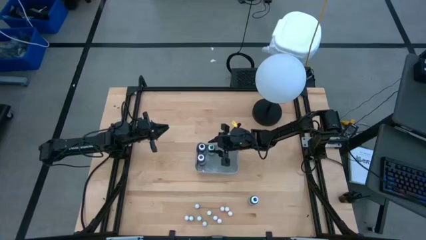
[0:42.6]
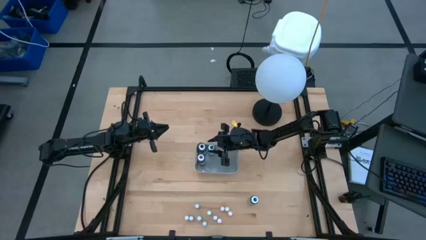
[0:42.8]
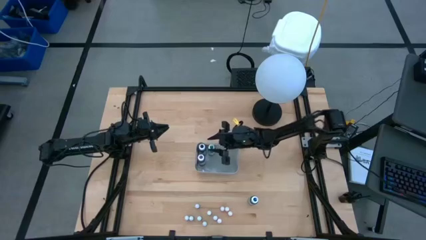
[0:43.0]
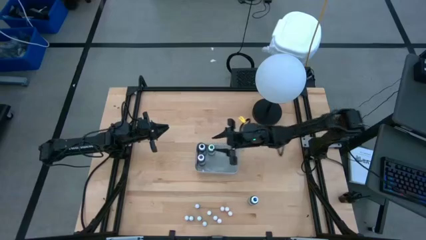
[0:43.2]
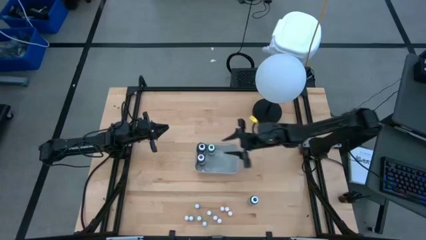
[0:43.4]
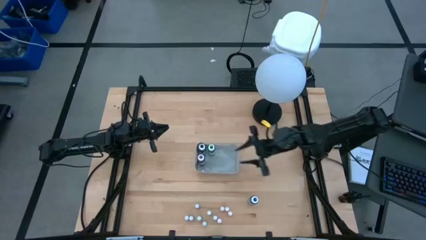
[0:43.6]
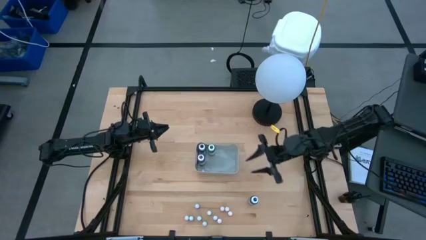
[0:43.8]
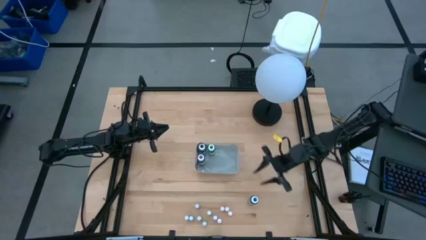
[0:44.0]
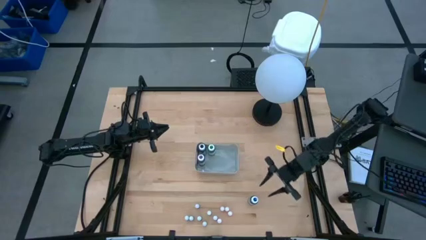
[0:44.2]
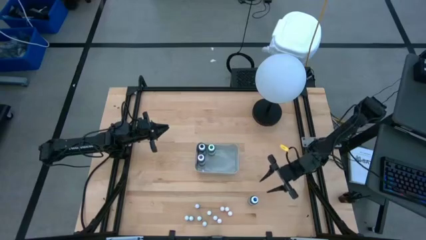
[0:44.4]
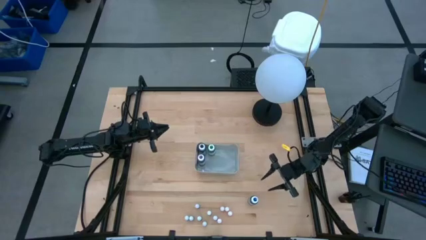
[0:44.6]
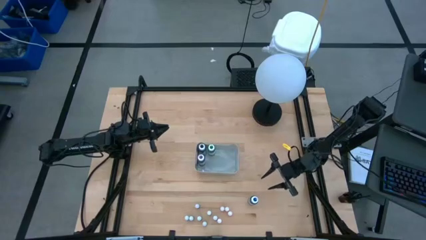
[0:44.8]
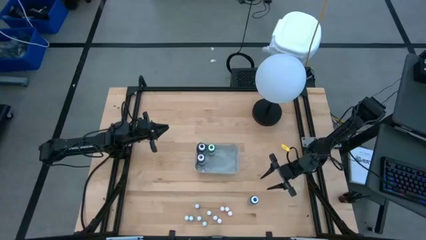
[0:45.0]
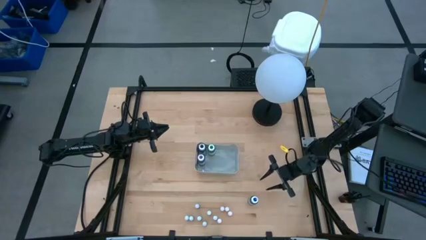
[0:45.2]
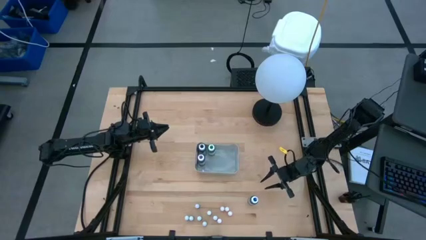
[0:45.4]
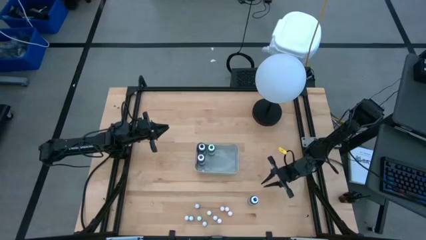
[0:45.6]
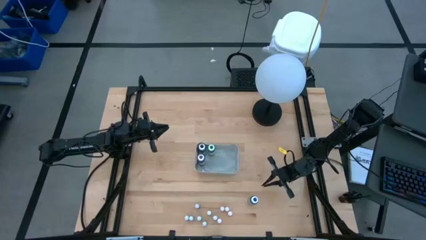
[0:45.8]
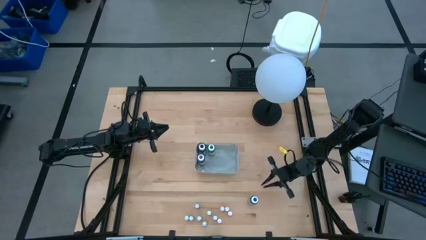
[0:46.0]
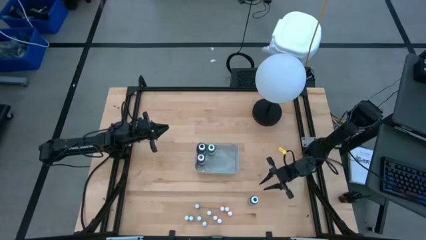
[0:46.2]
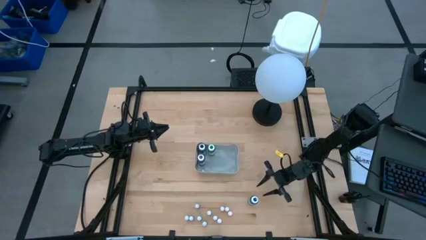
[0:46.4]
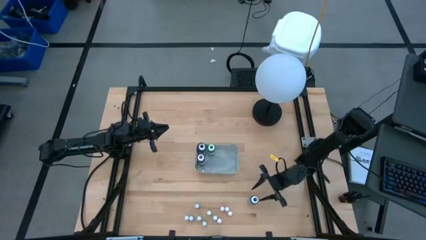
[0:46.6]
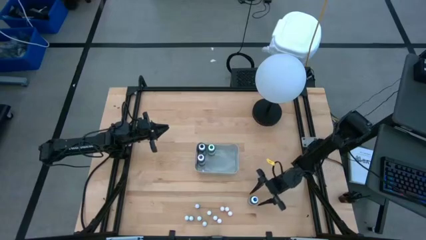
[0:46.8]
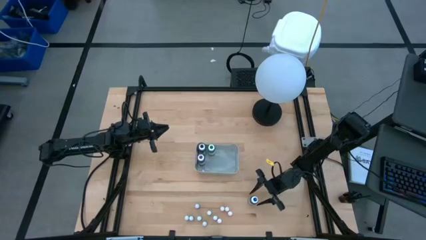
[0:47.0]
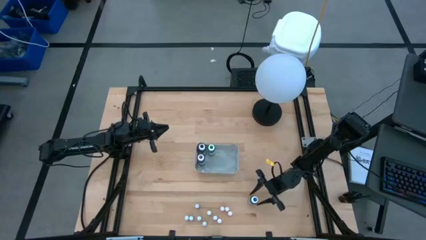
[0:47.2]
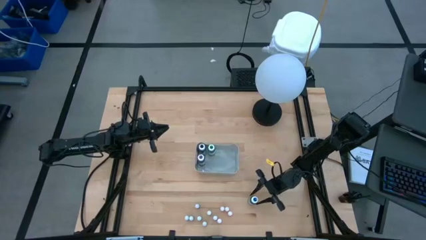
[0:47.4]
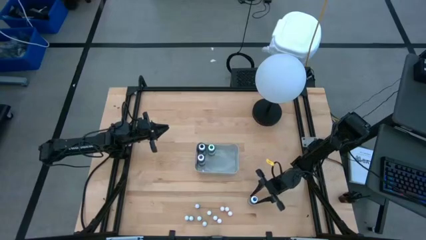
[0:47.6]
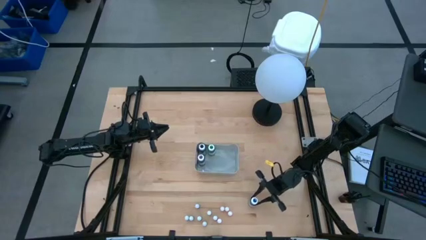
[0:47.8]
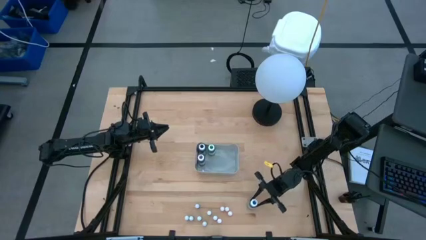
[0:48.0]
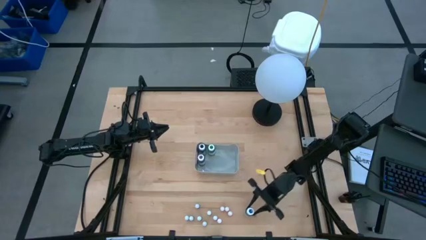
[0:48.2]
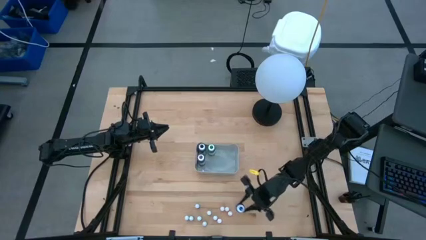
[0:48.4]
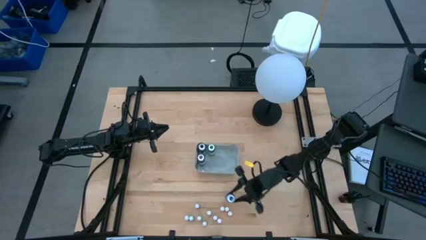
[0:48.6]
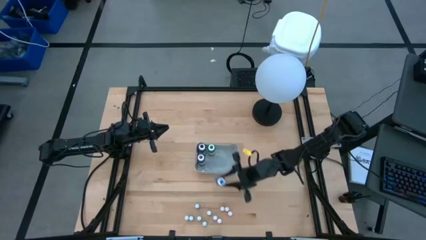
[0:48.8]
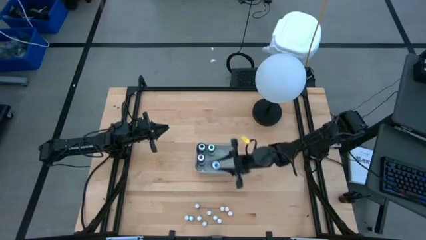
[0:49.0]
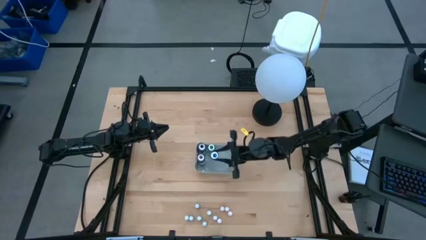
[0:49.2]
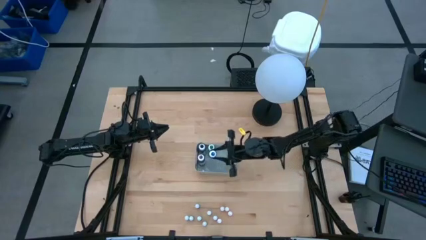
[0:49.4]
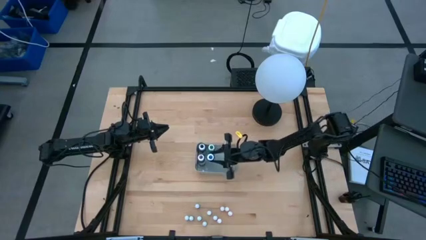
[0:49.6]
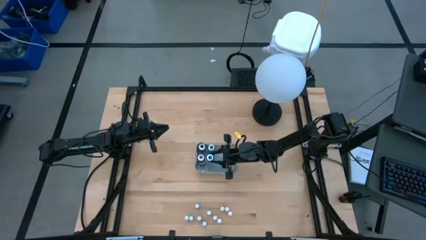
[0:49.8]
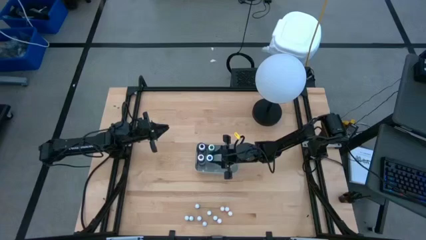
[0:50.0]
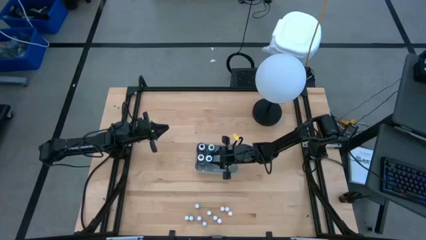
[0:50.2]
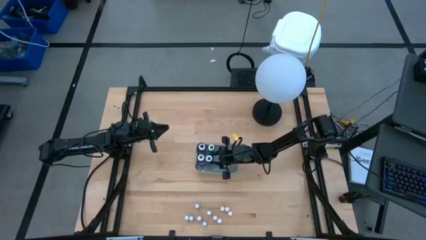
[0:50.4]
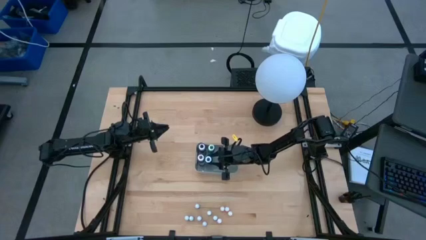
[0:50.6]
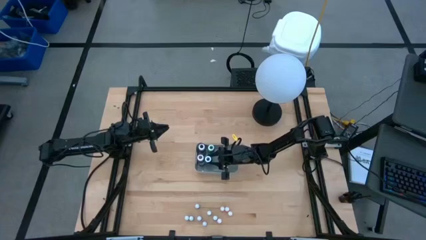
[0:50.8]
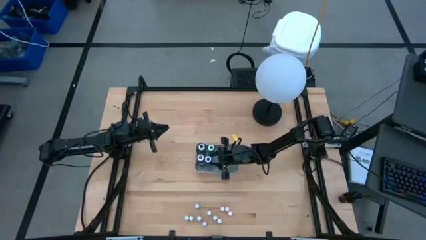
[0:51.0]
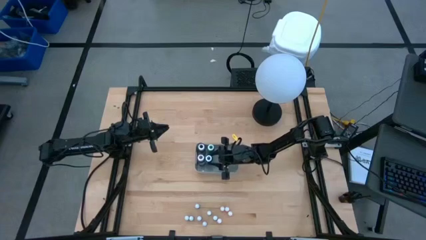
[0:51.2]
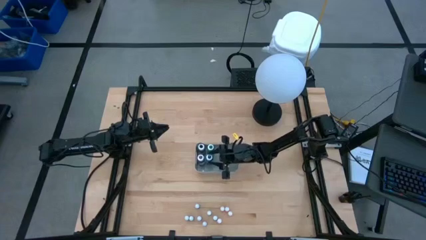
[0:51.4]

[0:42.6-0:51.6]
Task: Pick & Place food coloring
Put the large blue food coloring bottle into the gray bin

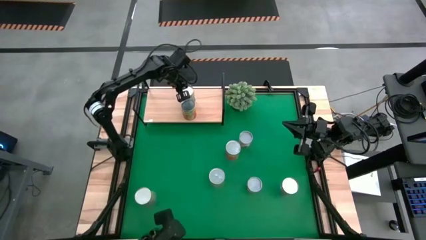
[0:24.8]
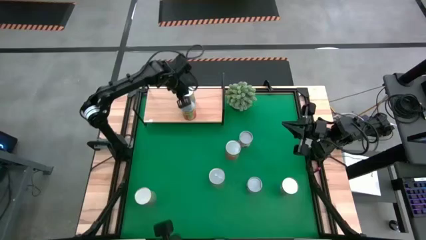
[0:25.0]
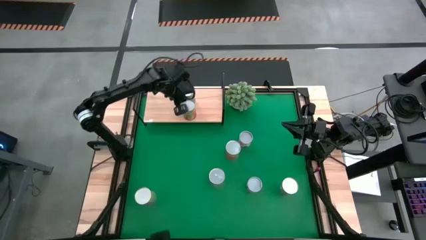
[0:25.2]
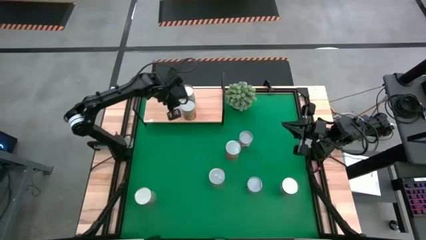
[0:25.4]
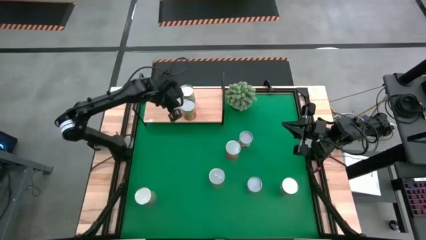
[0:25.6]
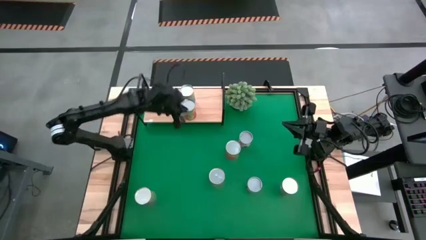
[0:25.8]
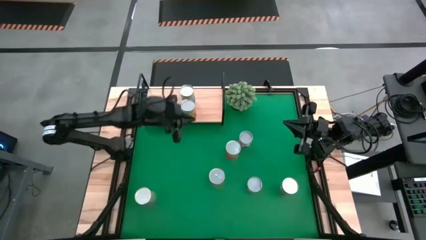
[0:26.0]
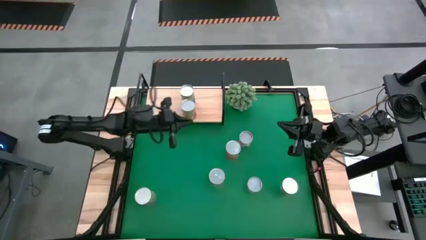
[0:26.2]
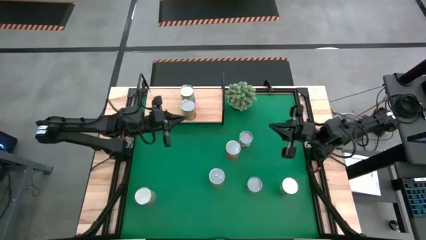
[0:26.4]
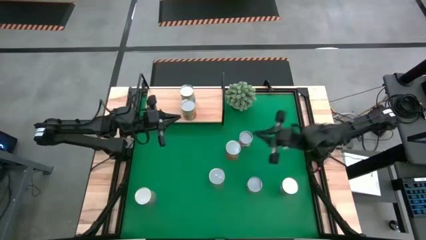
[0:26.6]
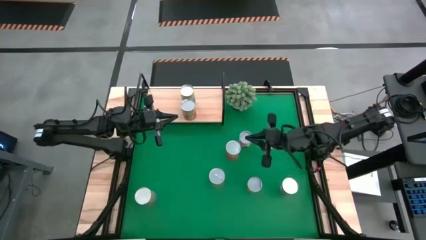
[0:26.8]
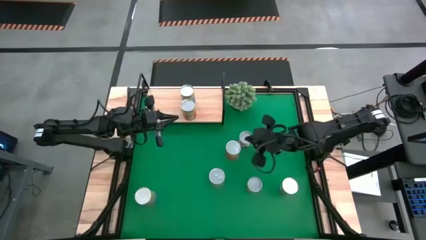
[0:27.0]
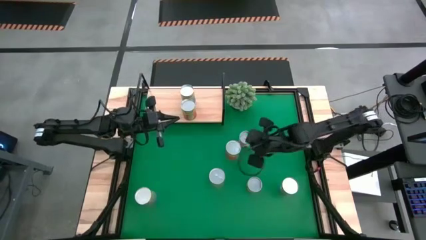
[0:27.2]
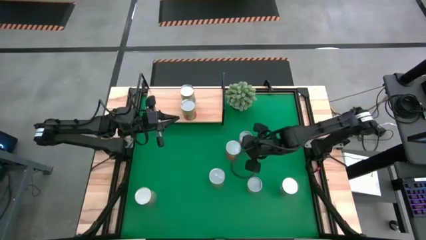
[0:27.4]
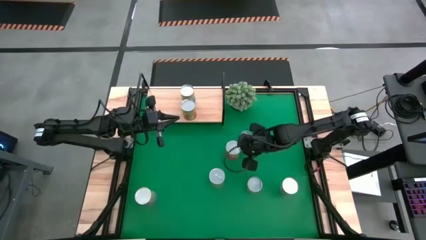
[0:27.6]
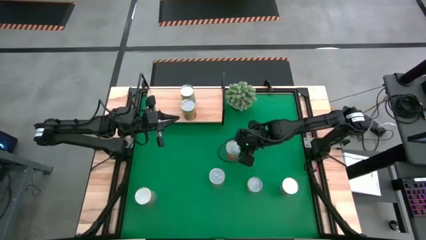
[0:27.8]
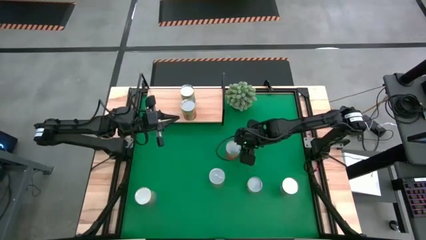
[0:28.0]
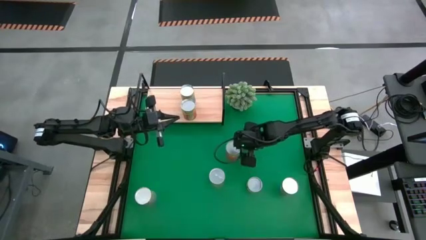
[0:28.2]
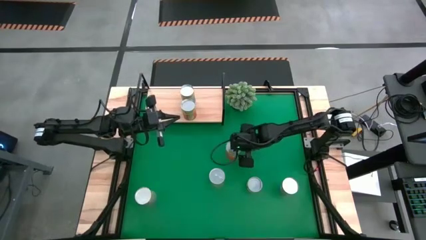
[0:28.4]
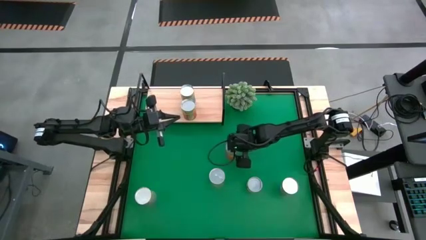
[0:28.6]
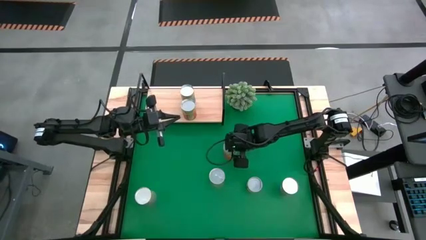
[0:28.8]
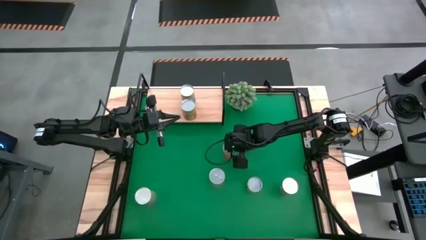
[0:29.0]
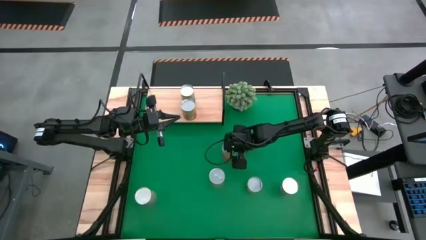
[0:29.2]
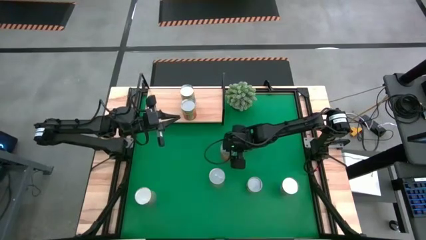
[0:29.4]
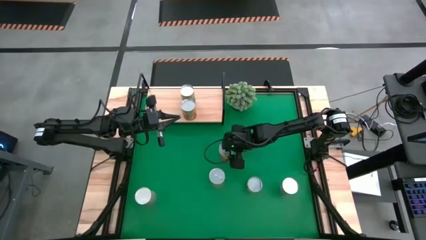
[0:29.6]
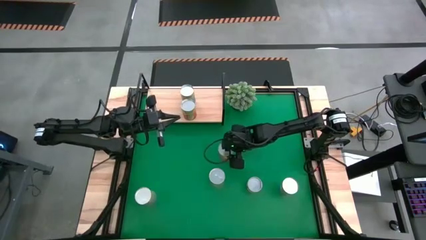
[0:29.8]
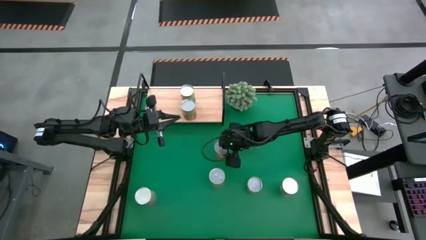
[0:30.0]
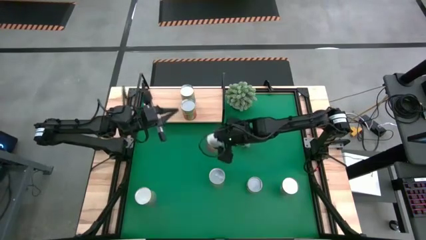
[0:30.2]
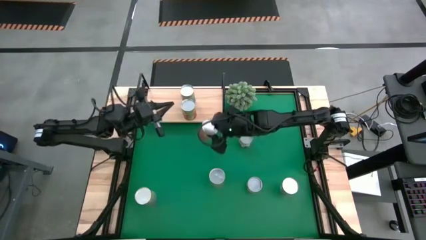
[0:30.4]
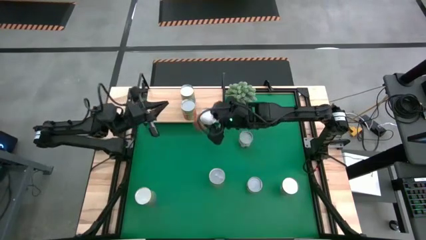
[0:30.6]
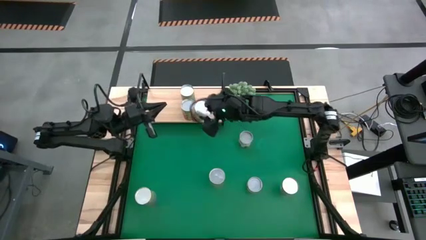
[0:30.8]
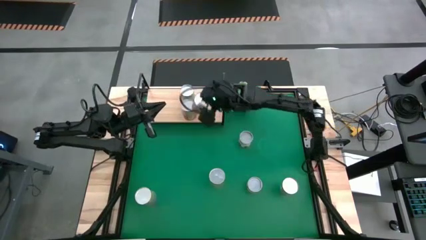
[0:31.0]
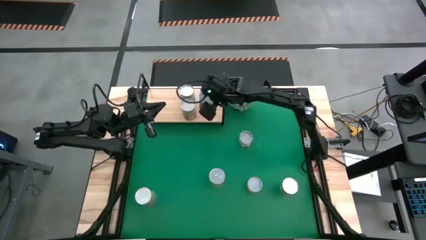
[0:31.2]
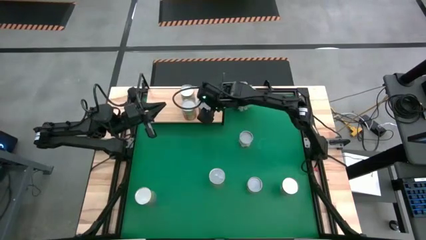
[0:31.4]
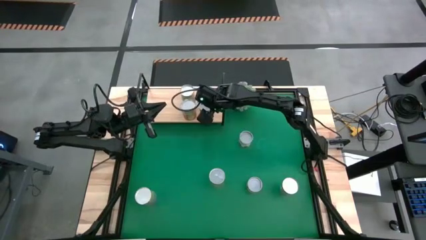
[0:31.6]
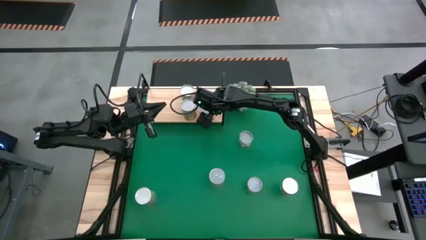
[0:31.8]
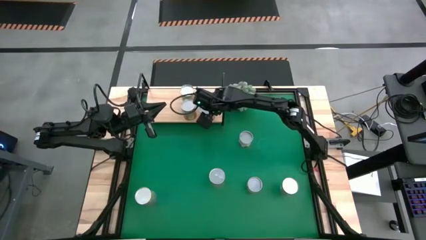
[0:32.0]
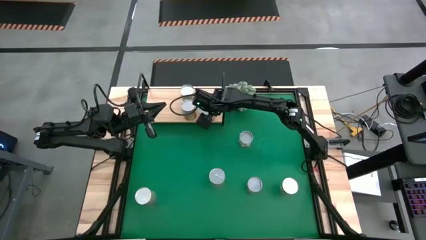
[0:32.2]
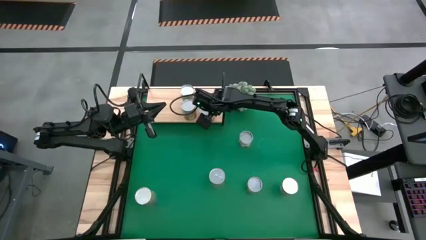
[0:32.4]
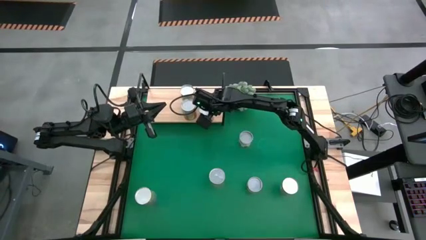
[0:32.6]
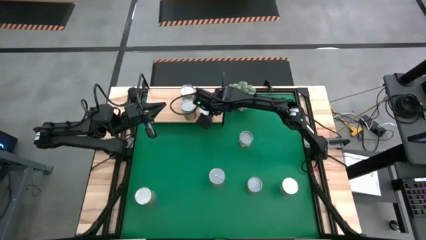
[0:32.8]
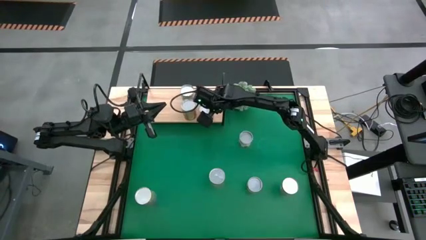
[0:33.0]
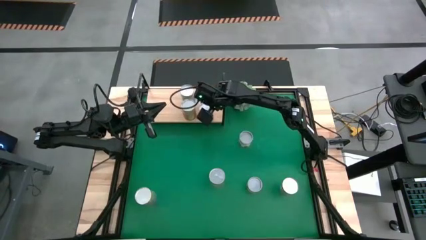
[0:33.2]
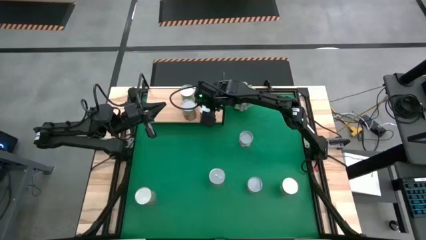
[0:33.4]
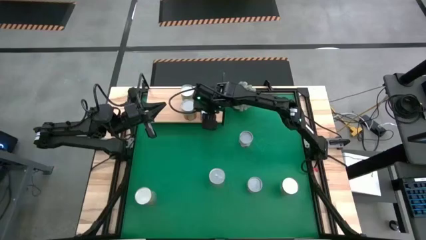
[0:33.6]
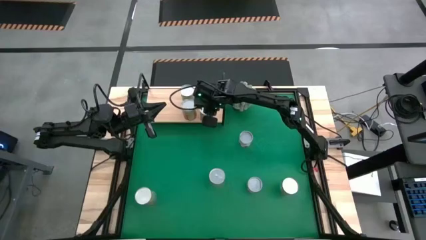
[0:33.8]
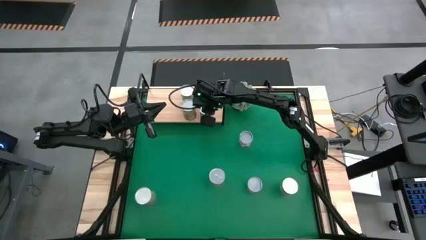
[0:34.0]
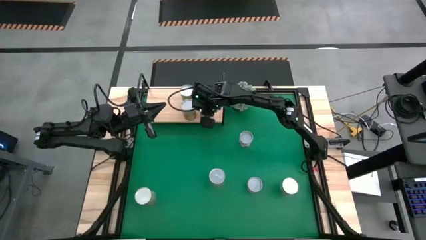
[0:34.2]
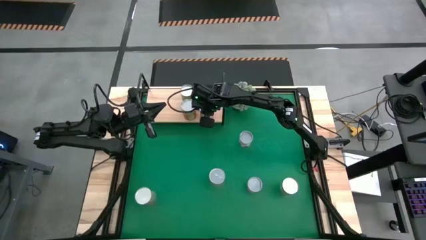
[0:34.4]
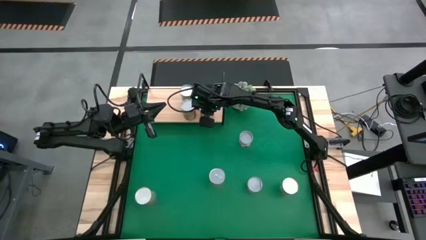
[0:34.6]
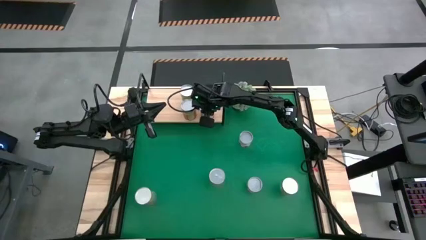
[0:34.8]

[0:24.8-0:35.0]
Task: Pick and place cans onto a shelf
Put the canned pineapple on the shelf
